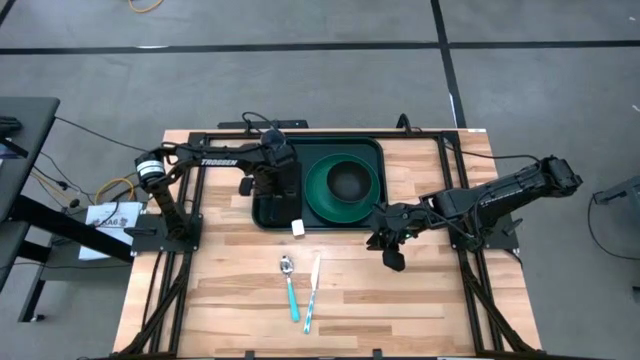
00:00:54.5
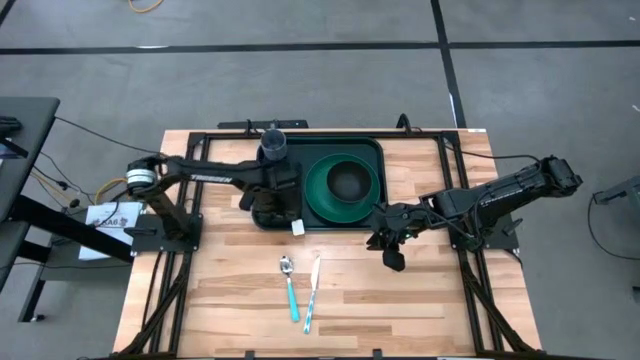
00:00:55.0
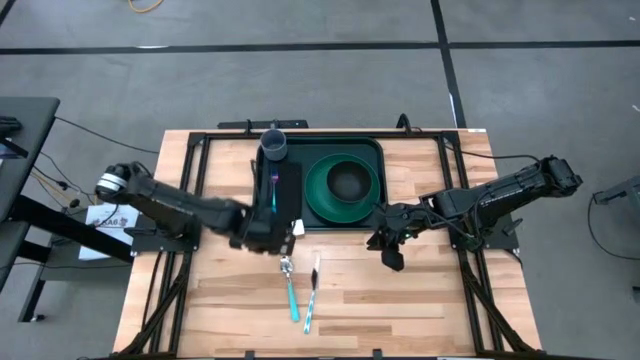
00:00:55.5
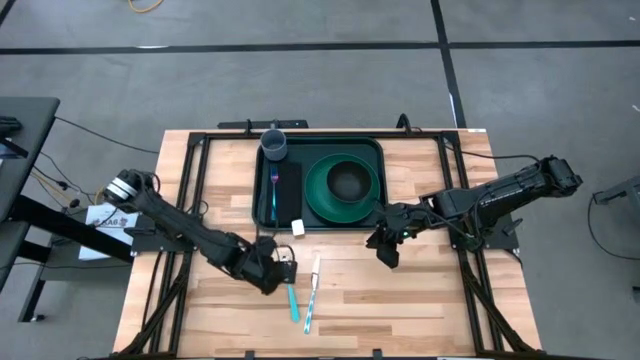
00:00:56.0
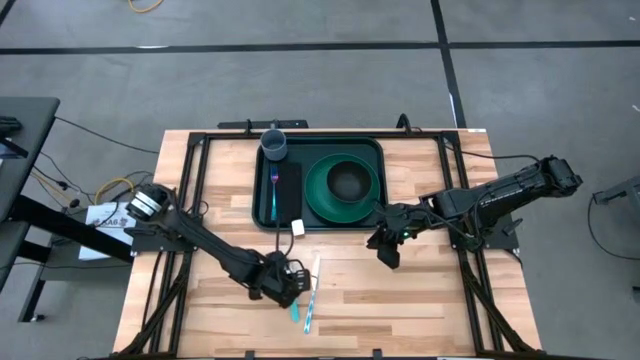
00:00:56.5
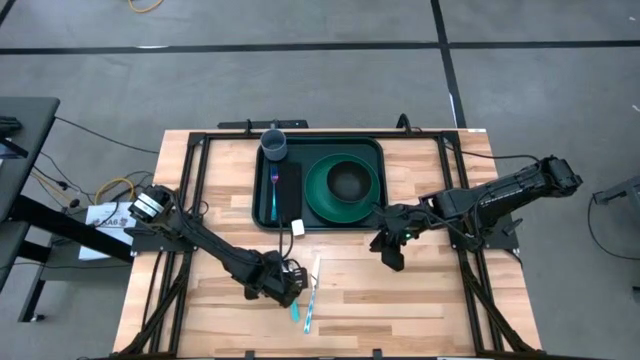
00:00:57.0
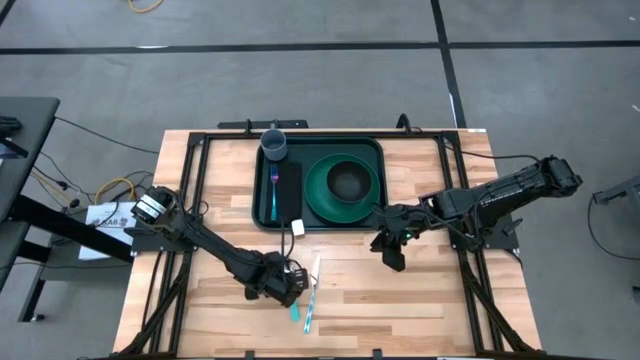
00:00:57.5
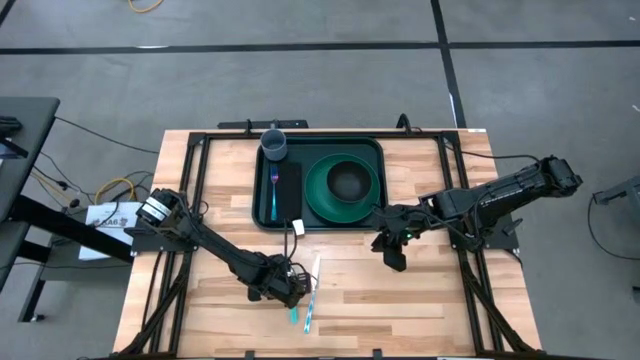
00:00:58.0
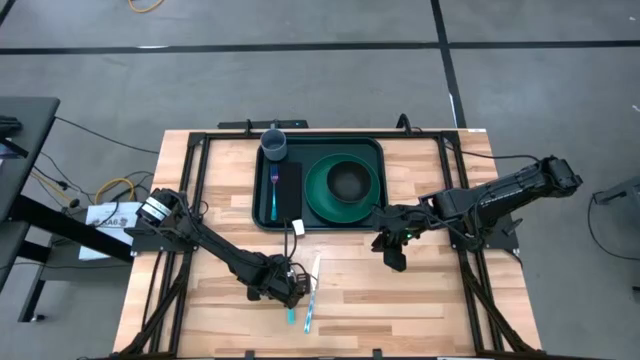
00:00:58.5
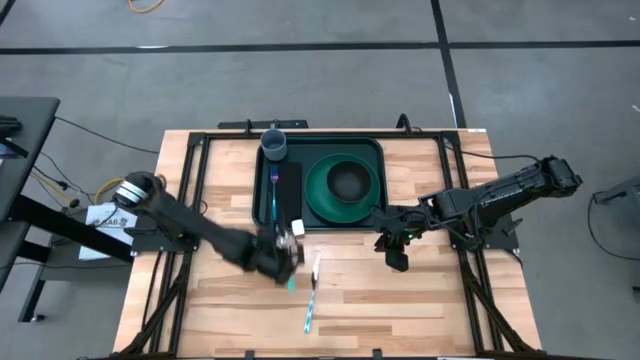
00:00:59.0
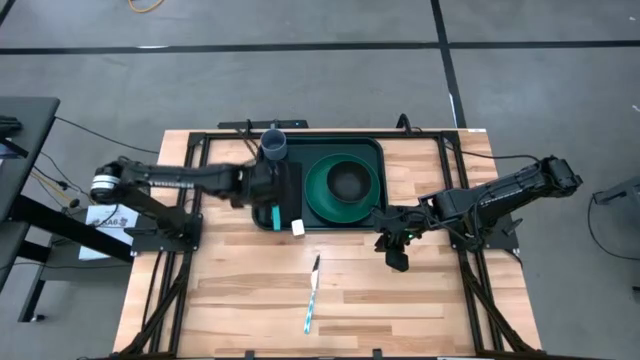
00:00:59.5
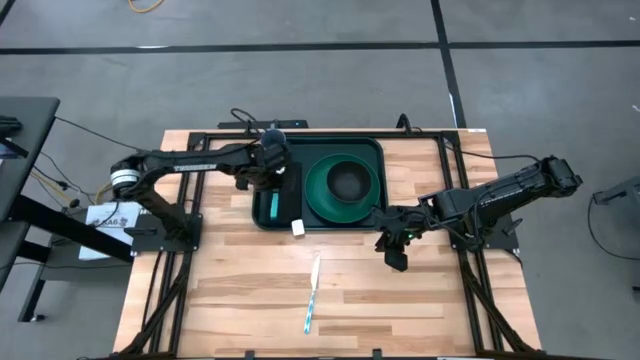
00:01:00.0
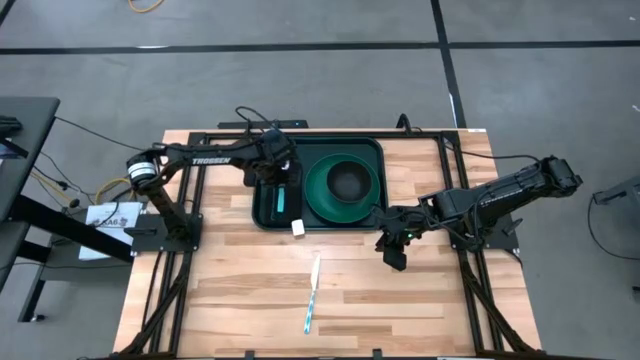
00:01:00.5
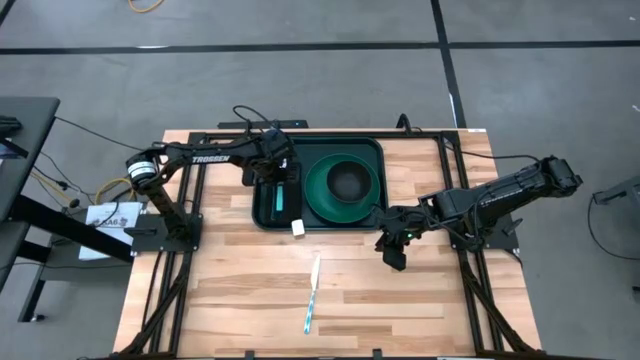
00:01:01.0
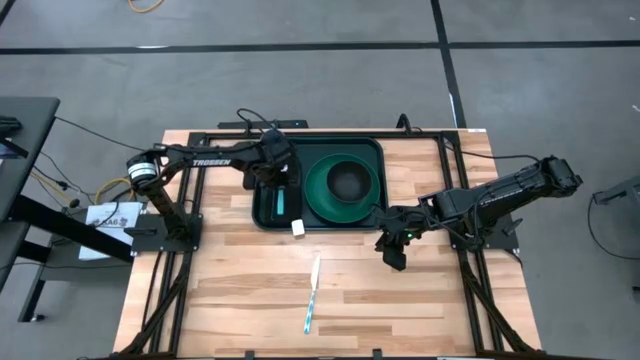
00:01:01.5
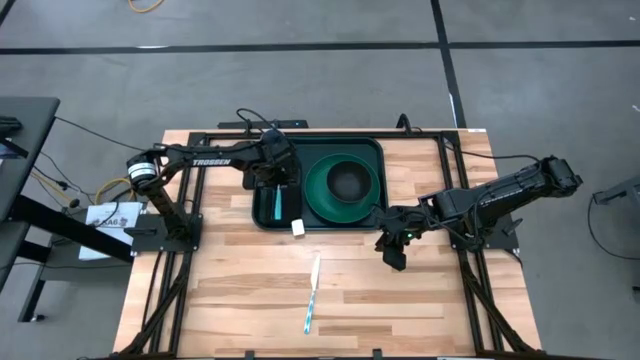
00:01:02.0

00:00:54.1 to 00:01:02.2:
Task: Set up tray
Put the blue spoon to the right of the blue fork on the dark green tray

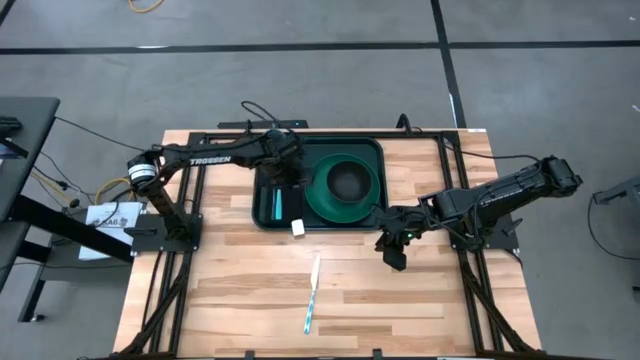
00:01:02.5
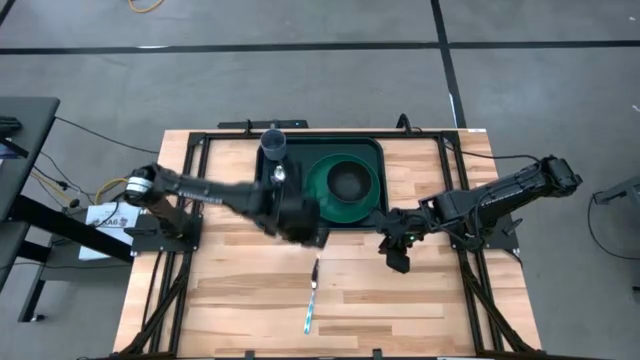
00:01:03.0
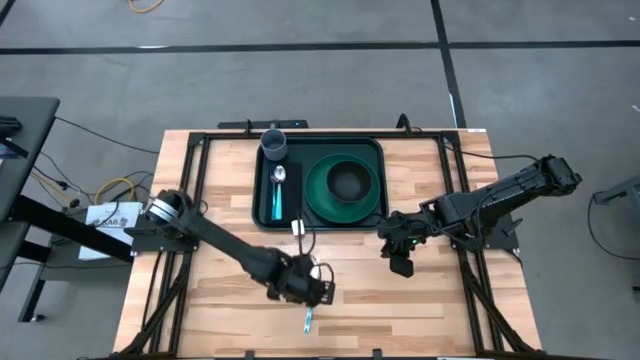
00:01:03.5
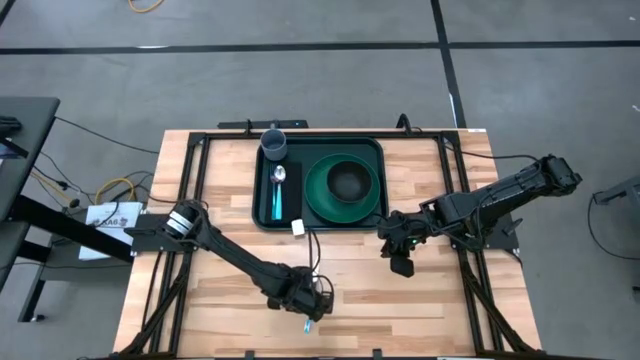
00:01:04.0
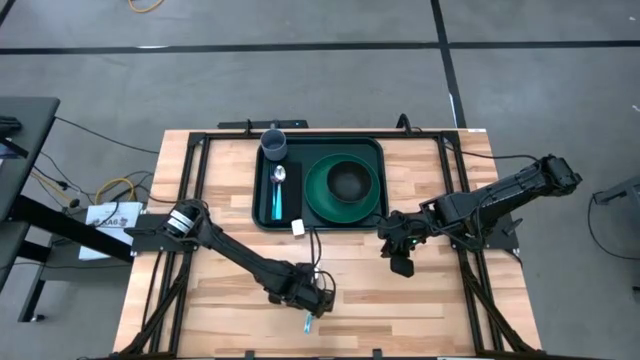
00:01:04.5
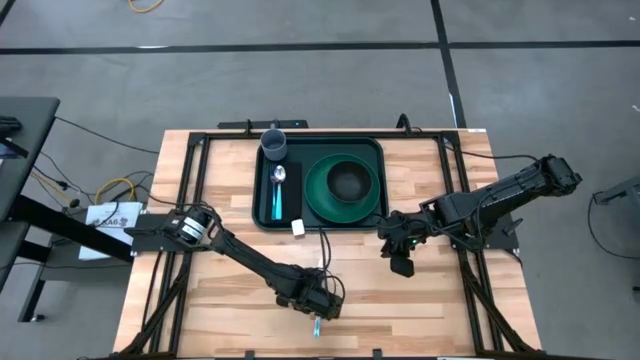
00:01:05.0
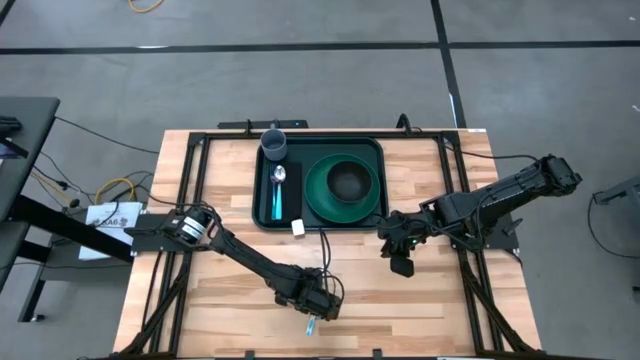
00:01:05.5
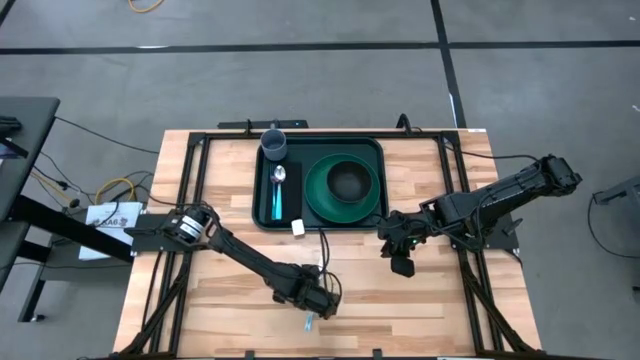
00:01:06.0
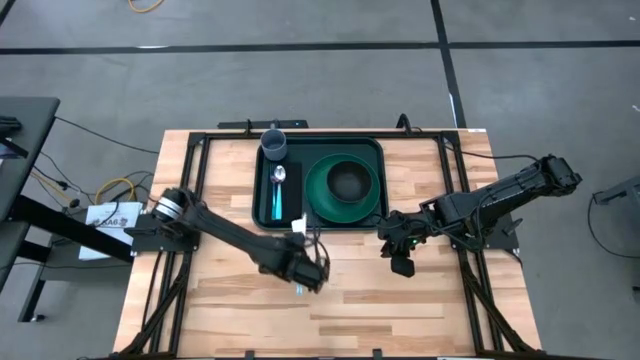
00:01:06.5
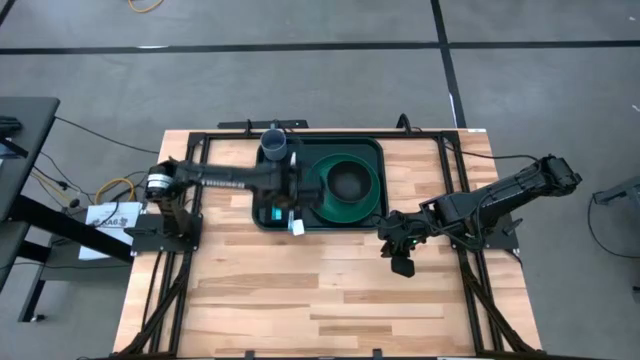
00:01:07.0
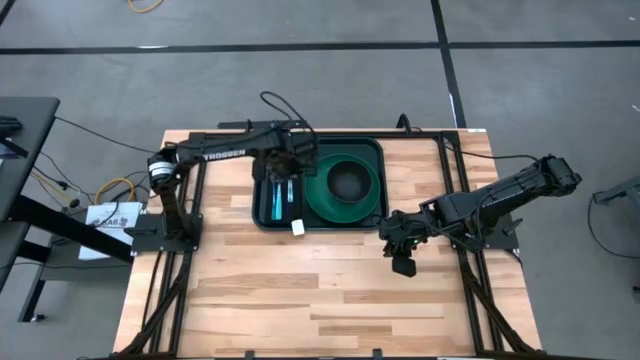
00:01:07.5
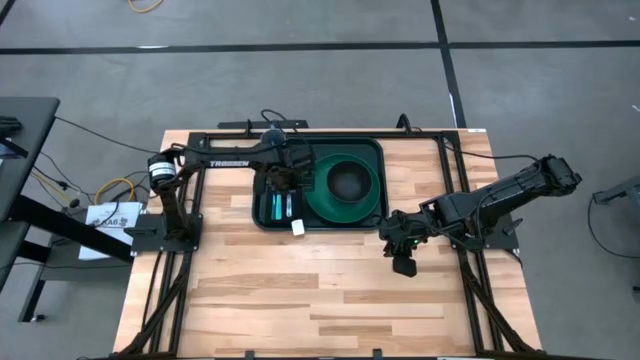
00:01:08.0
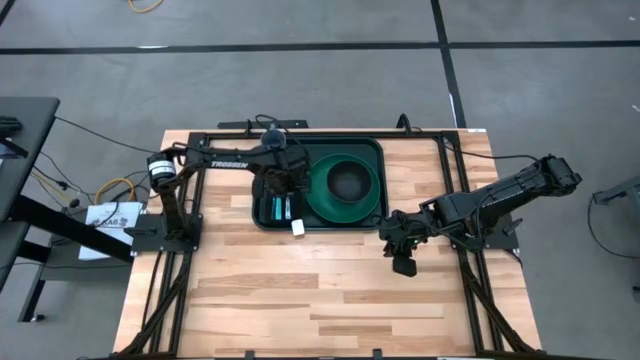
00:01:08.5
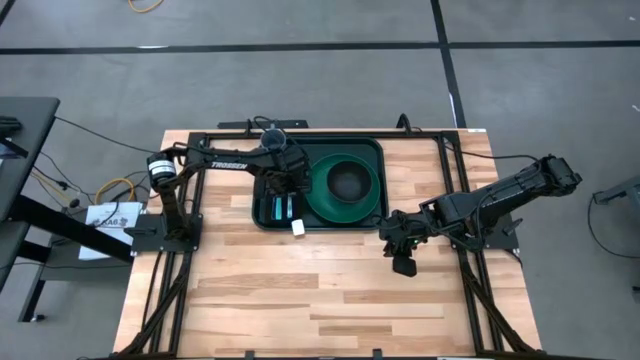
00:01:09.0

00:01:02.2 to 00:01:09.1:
Put the blue knife to the right of the blue spoon on the dark green tray

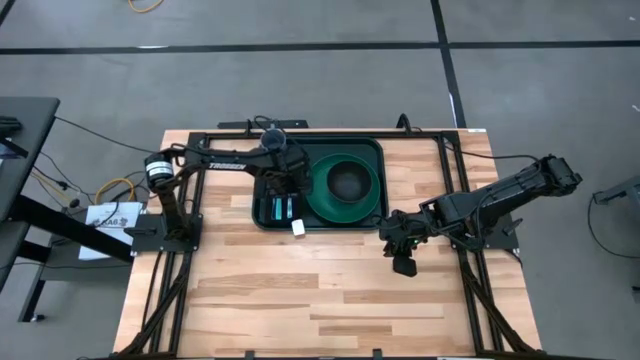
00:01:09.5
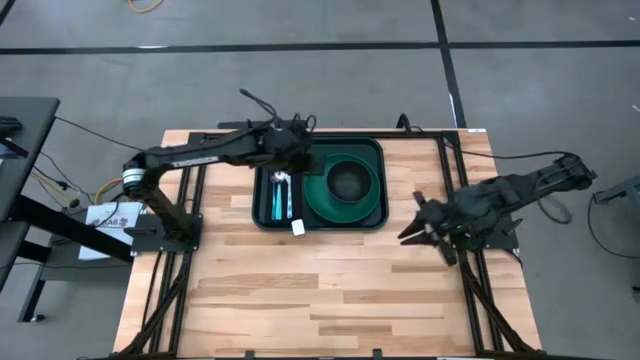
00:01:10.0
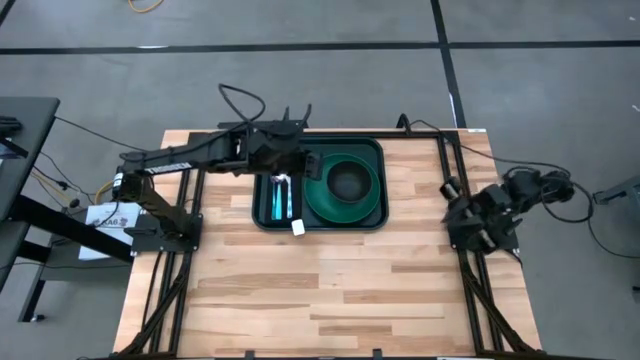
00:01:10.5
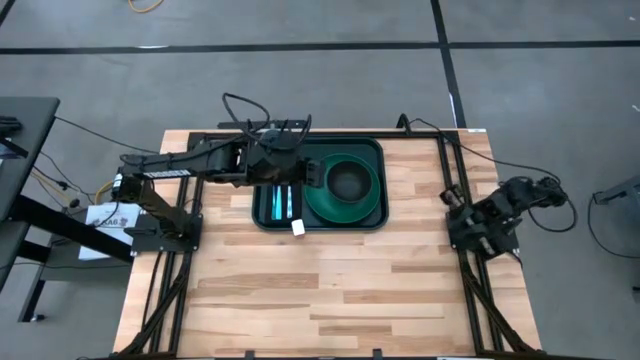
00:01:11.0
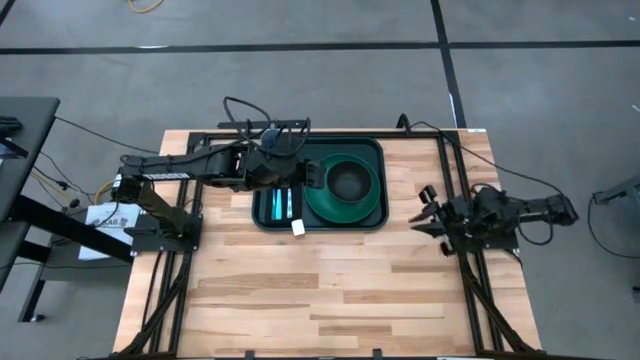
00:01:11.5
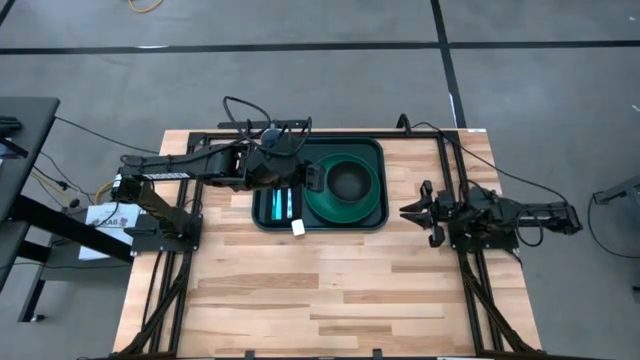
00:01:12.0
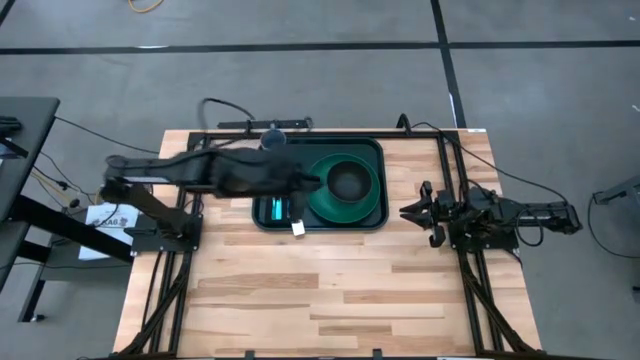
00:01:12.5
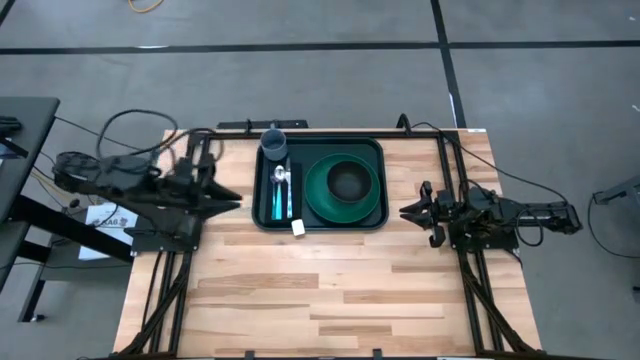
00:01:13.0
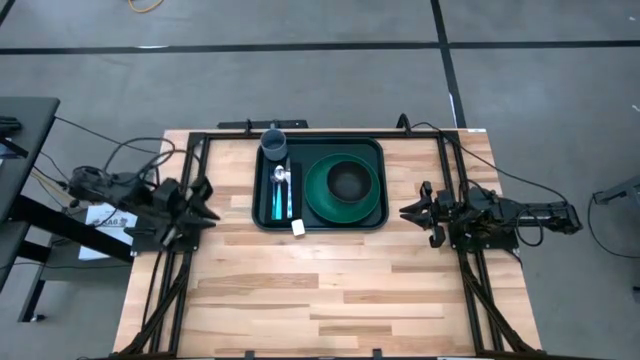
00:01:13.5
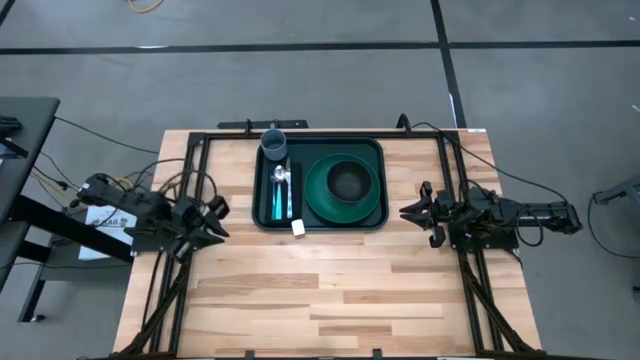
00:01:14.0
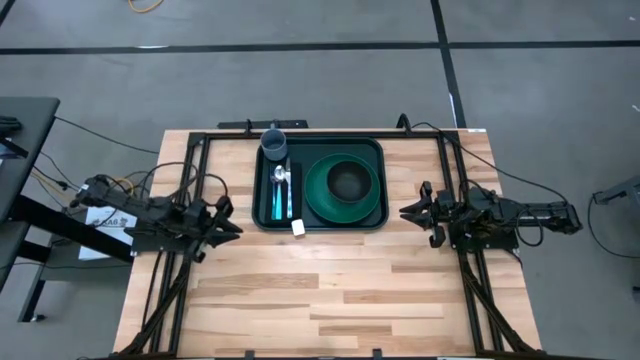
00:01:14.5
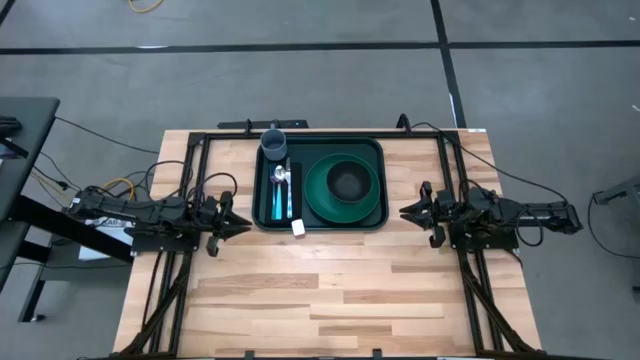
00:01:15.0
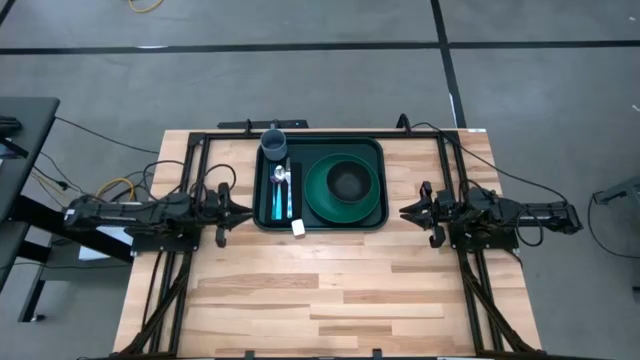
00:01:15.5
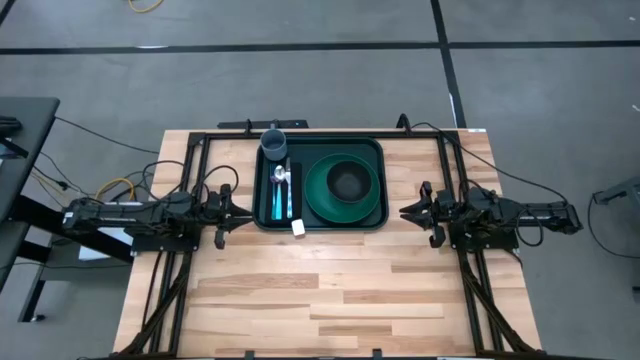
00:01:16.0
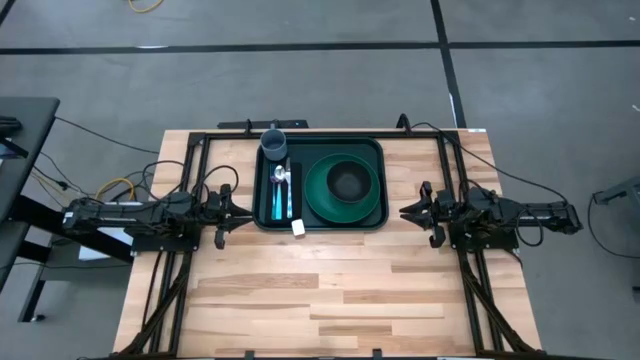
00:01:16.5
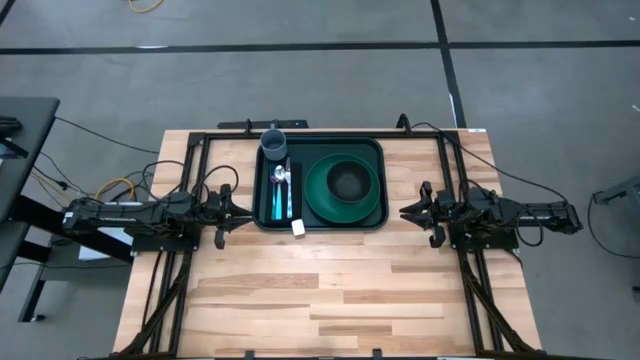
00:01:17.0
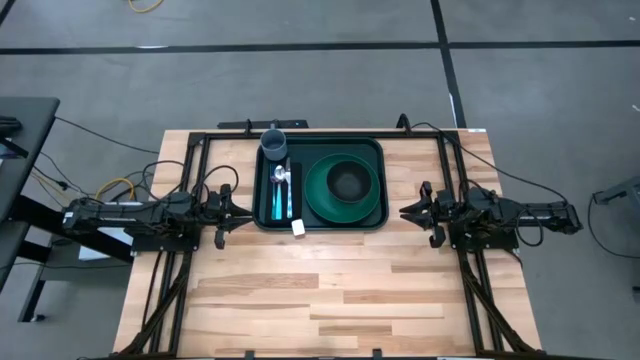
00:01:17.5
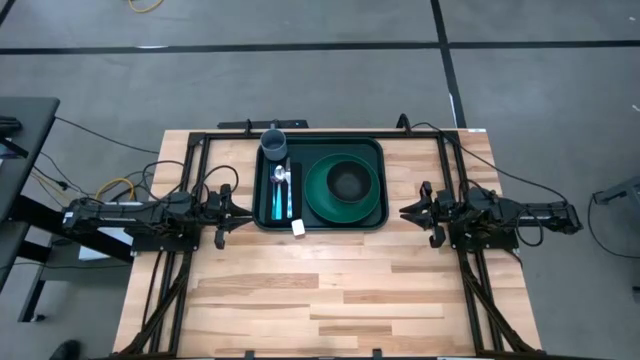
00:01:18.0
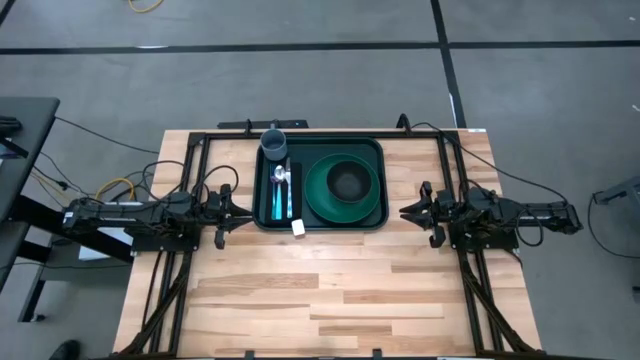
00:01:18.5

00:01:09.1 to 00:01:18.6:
Return to Home Position
